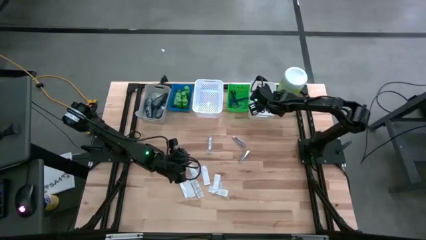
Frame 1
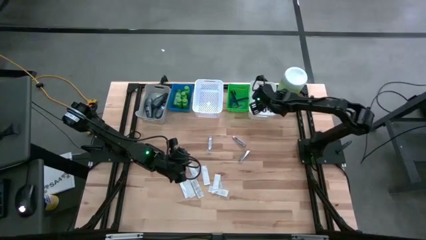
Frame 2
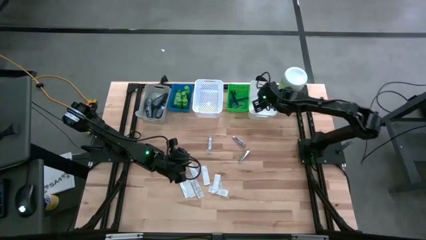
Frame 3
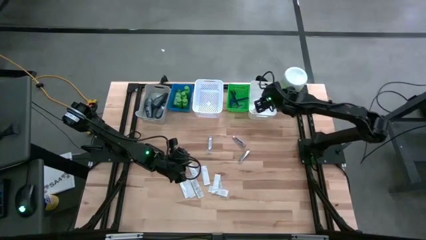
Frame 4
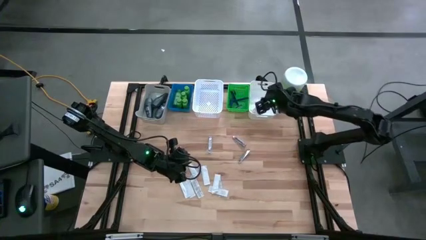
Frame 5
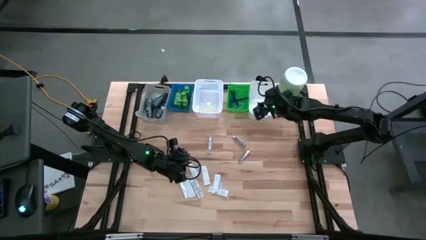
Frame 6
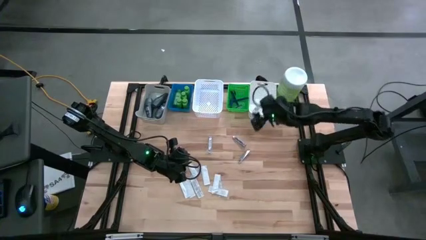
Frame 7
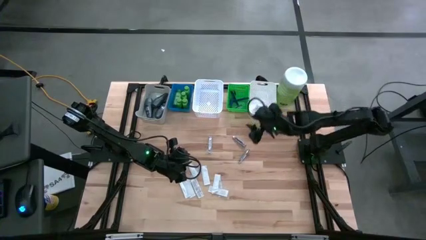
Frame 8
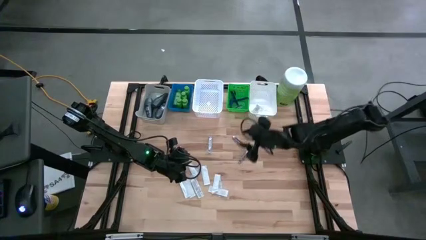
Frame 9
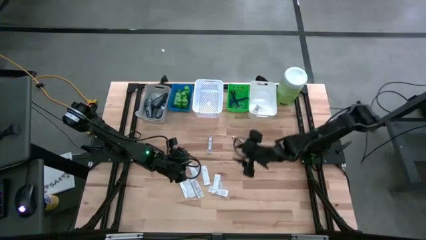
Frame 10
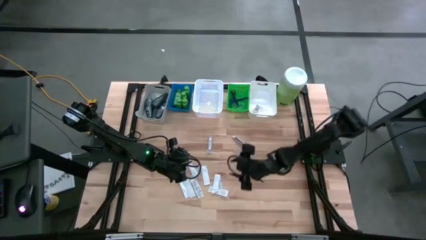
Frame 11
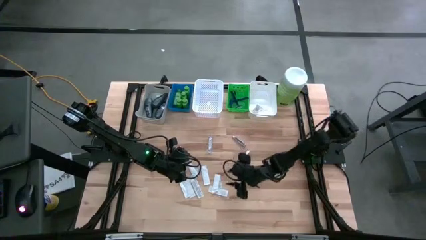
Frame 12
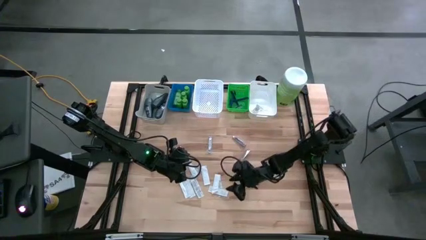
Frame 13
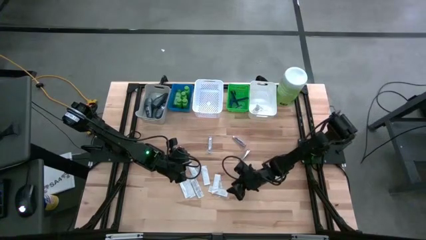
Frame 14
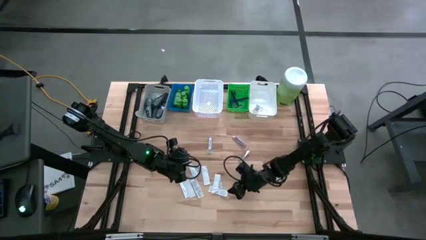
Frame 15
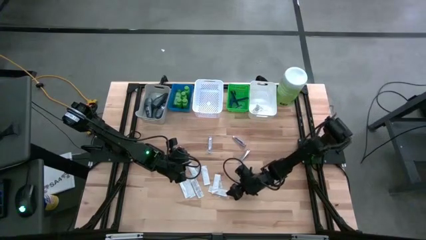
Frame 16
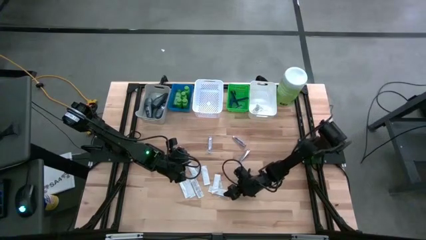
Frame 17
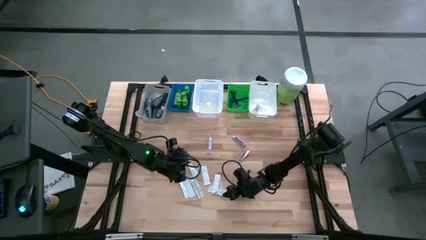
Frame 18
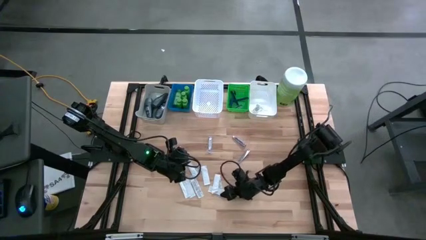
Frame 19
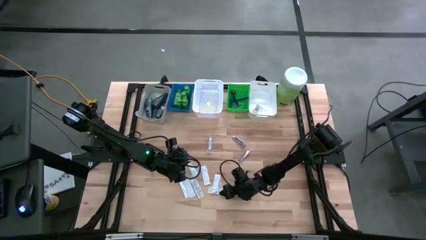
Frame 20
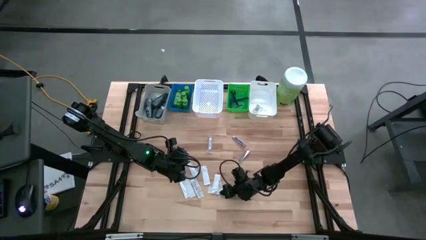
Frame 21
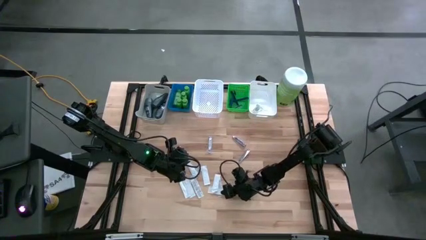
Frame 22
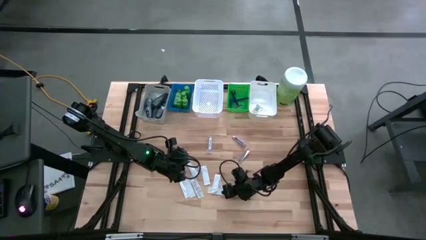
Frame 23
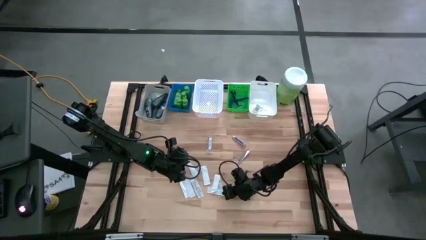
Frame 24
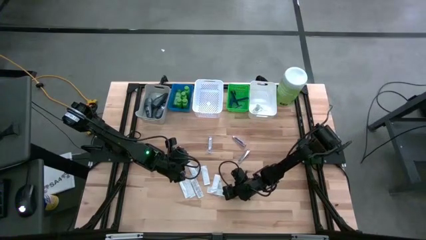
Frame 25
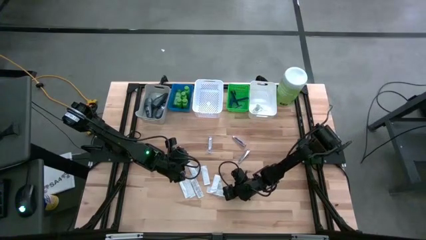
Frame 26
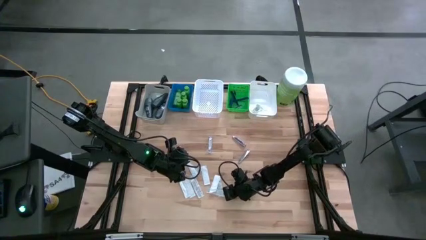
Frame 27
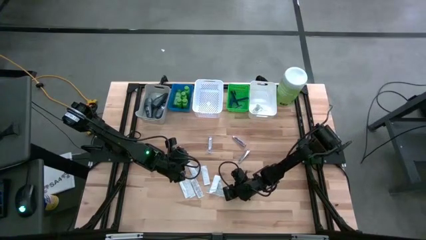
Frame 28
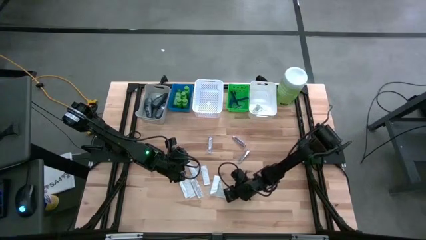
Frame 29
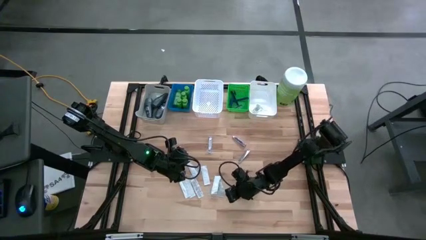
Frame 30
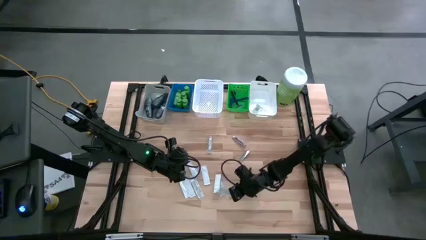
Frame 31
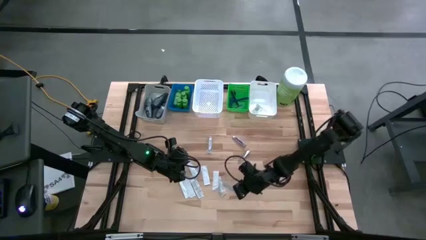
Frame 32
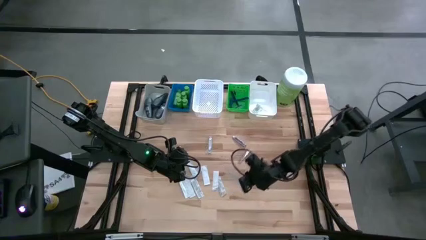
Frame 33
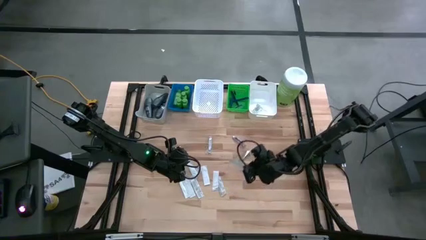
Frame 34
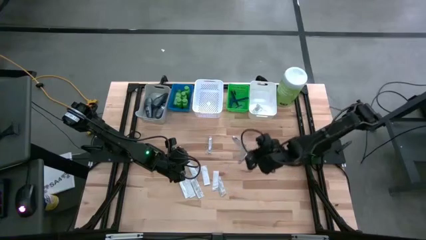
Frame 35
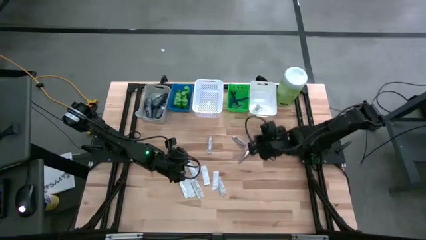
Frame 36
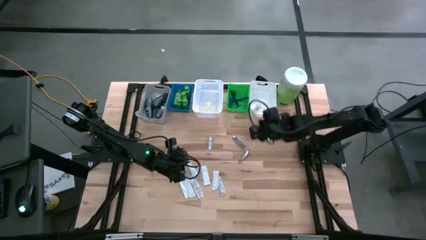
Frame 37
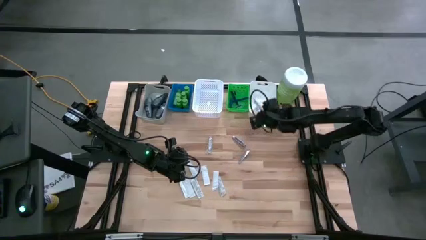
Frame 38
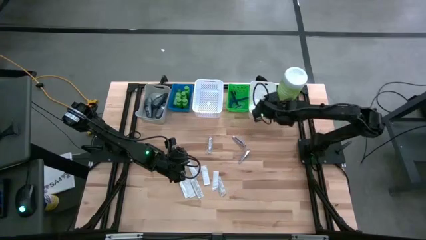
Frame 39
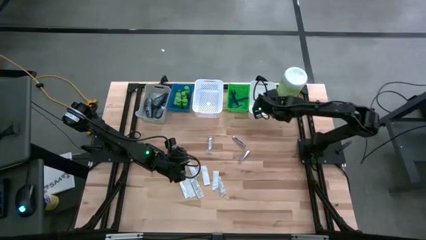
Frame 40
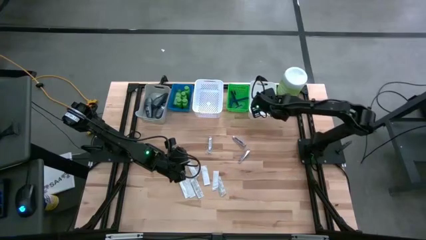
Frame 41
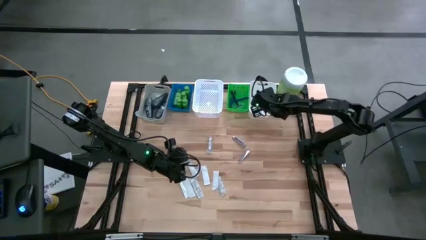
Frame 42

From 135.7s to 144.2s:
Task: Pick & Place Travel size toiletries
Put the bandage into the right white bin

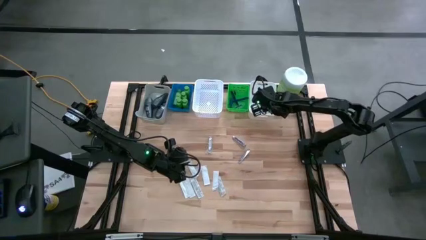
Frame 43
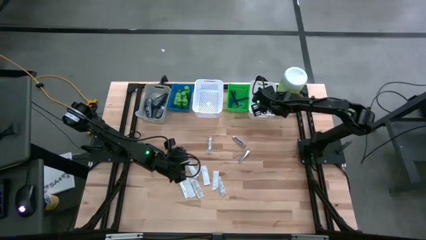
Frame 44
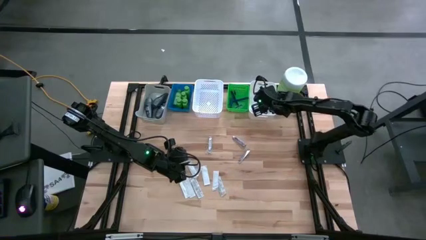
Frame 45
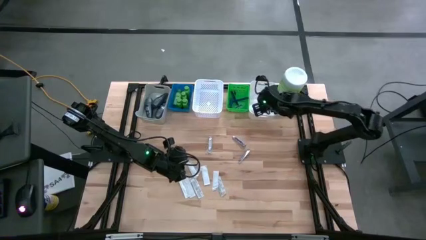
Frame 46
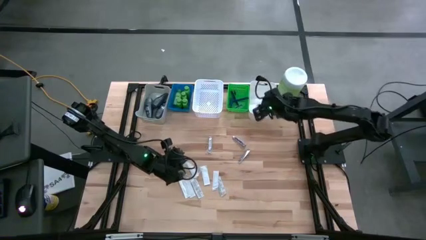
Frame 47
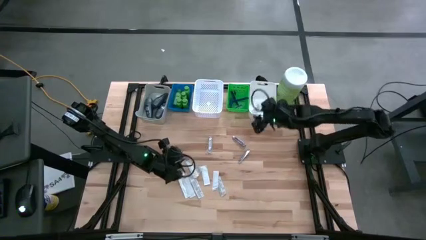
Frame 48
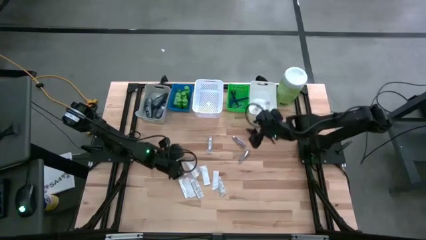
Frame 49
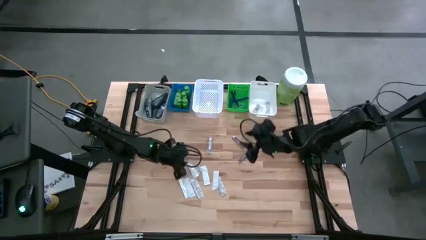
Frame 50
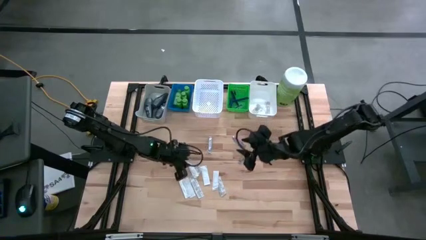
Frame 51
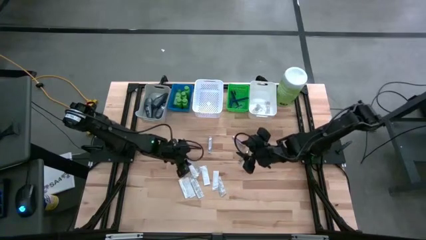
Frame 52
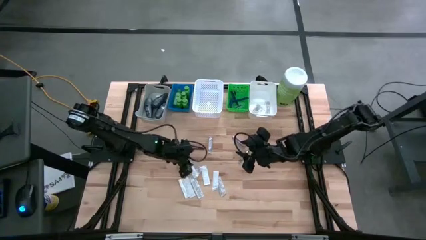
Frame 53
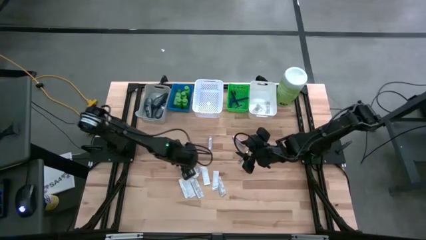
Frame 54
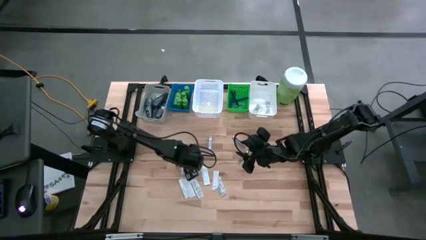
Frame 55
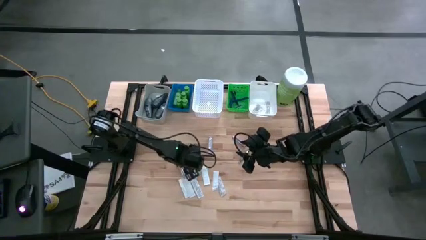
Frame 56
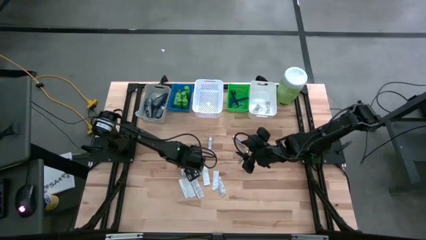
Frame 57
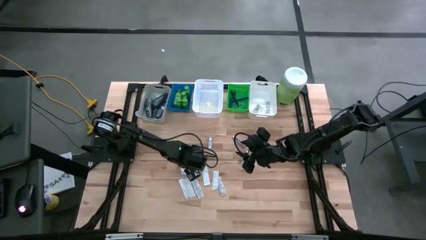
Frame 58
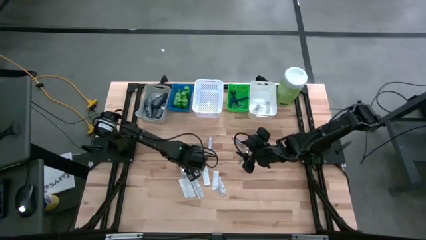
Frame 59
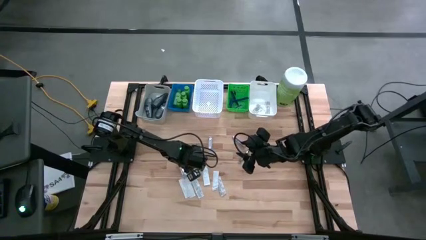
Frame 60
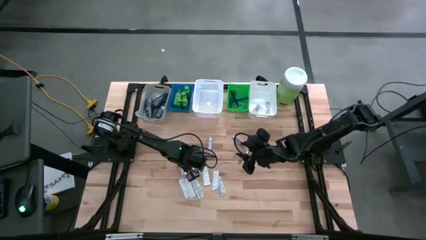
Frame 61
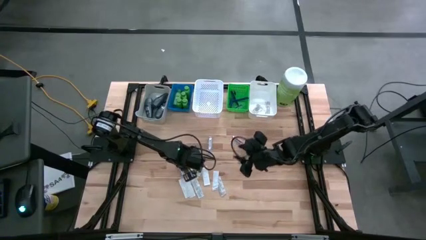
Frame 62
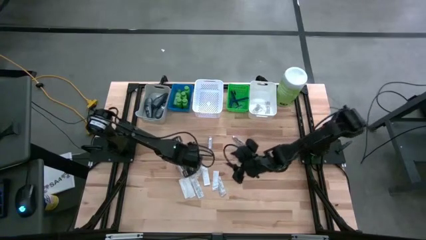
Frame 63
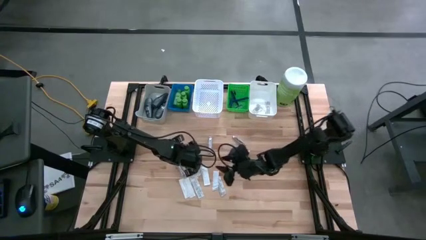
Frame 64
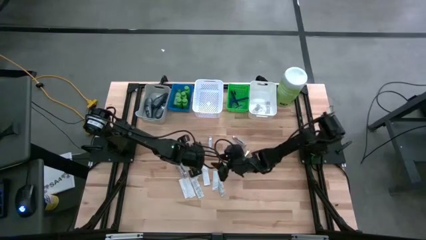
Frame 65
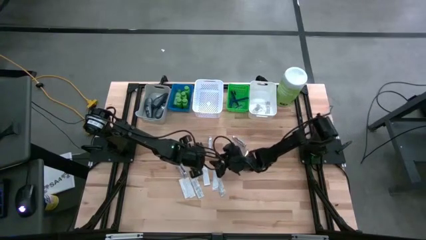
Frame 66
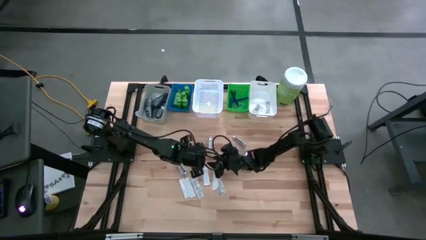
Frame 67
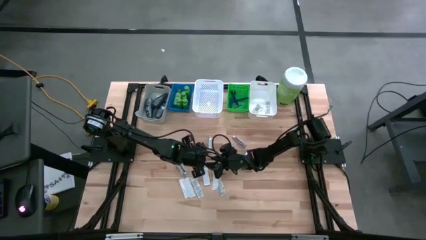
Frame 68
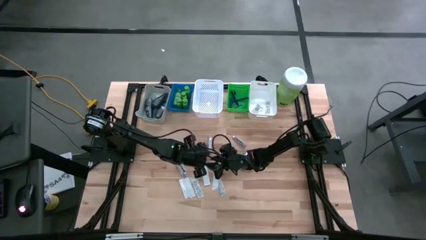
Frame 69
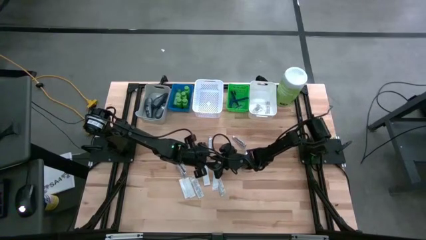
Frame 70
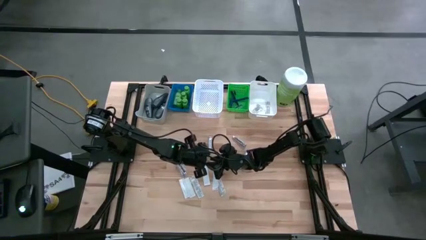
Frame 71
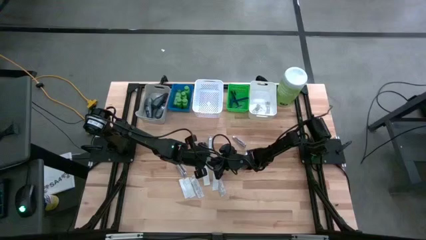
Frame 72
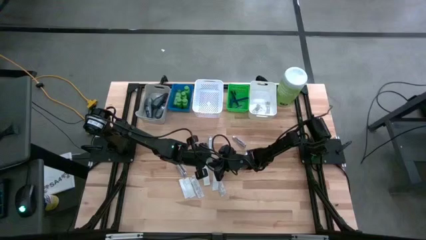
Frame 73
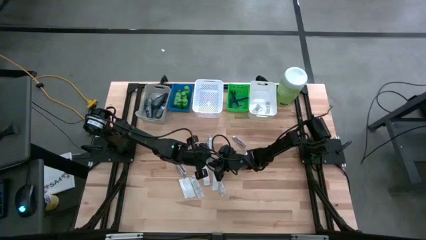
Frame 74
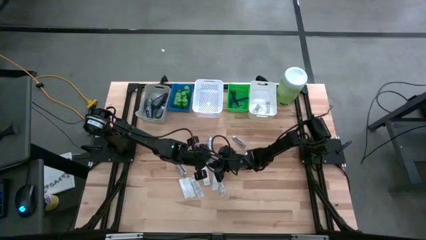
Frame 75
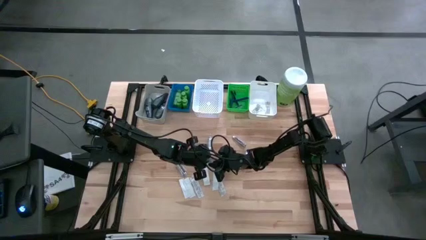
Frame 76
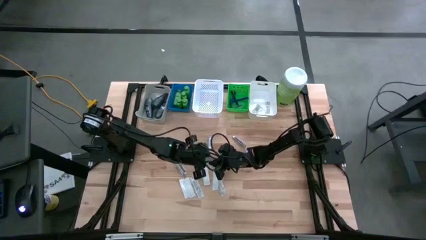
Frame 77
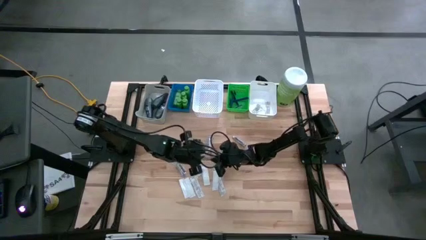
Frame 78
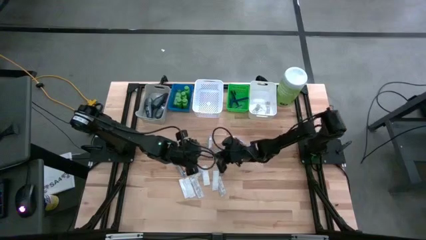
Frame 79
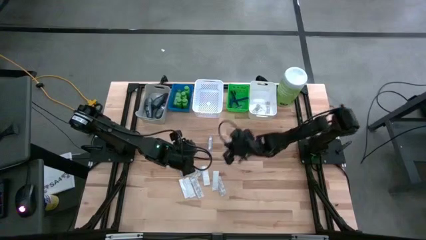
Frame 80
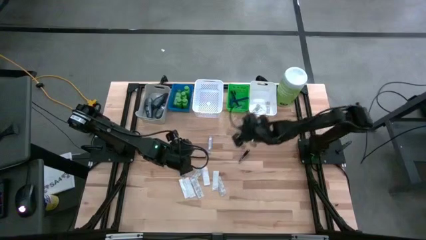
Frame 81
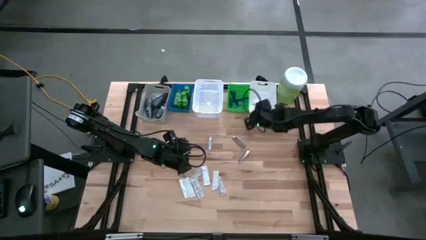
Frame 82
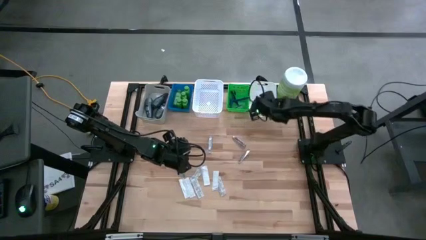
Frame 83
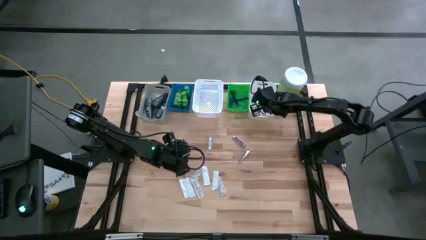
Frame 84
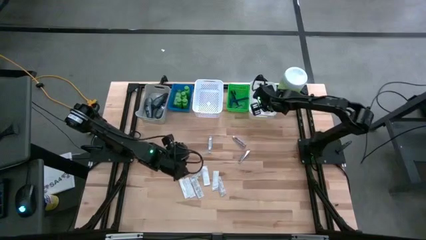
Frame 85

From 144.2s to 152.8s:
Put the bandage into the right white bin
